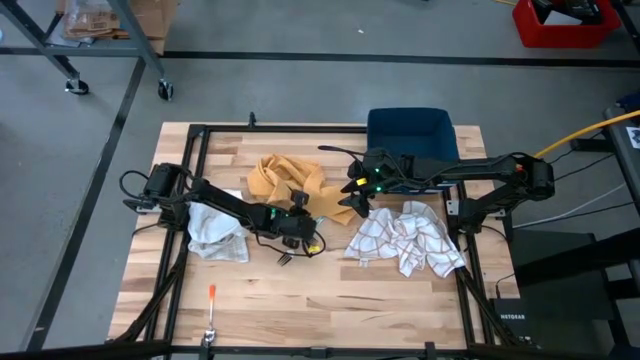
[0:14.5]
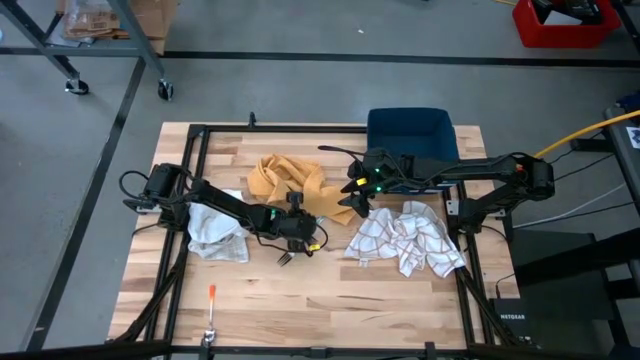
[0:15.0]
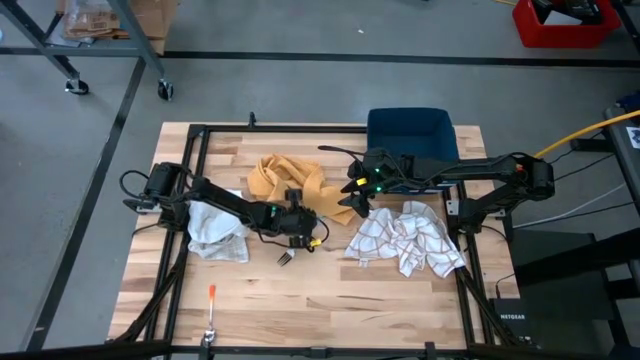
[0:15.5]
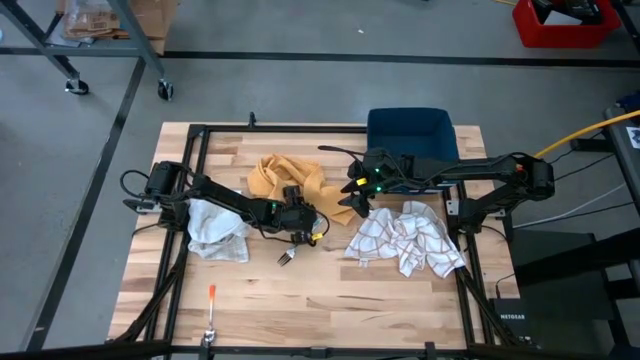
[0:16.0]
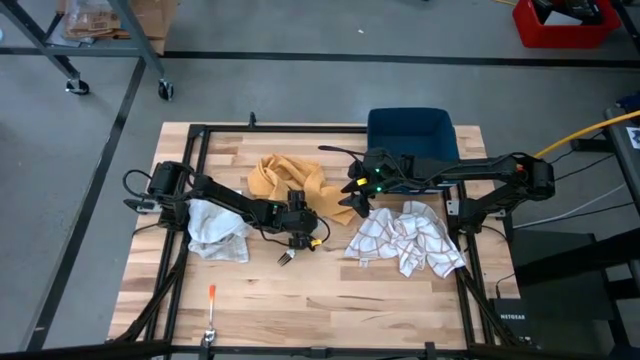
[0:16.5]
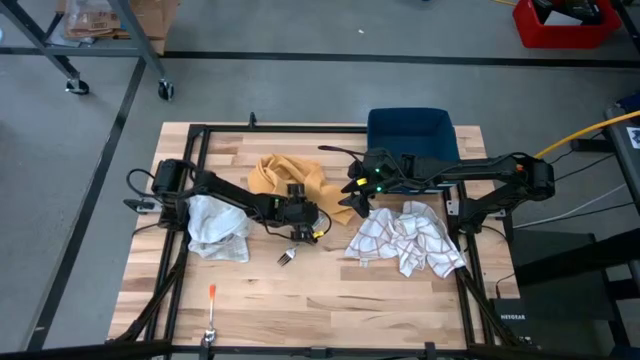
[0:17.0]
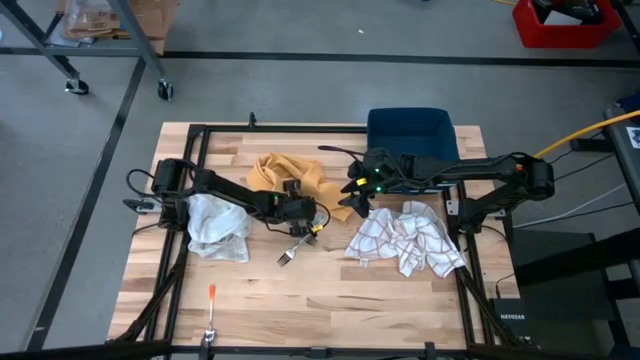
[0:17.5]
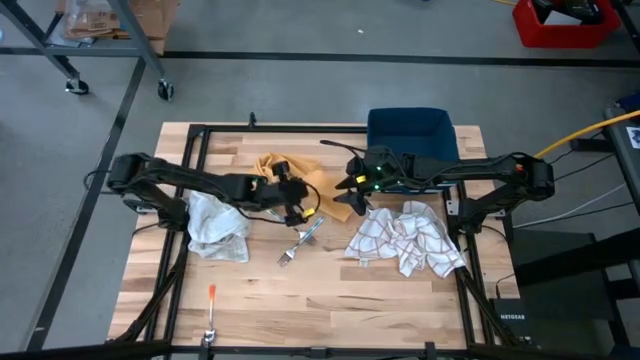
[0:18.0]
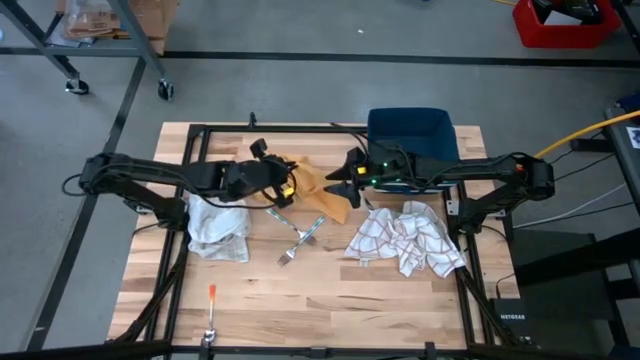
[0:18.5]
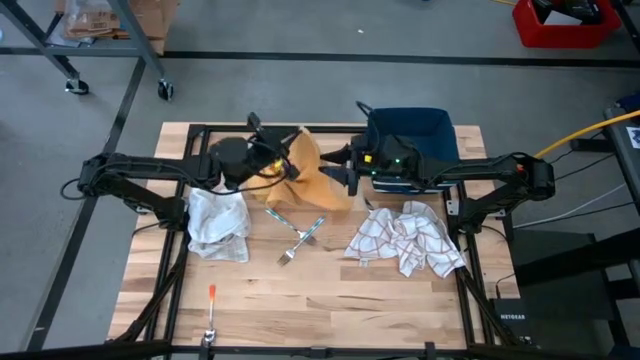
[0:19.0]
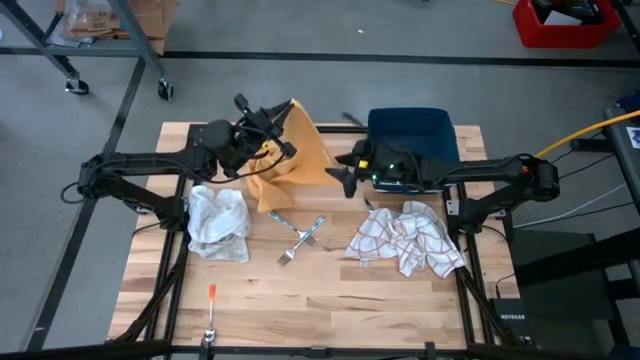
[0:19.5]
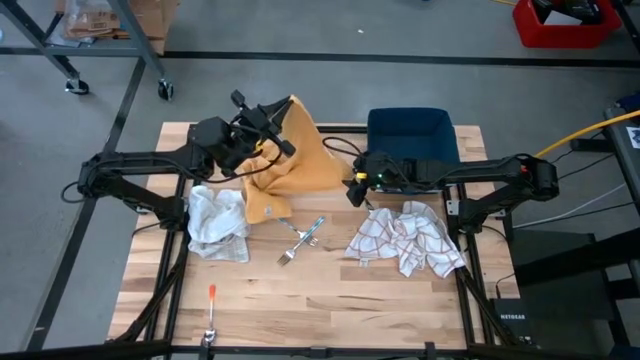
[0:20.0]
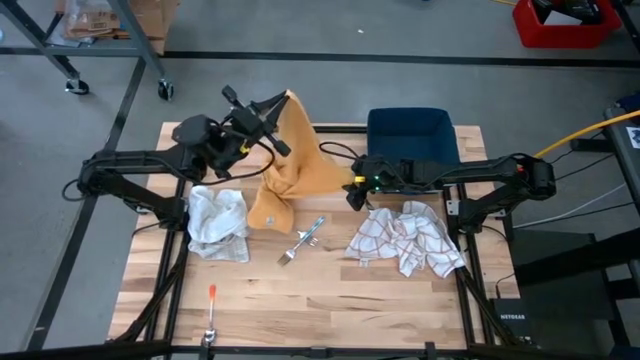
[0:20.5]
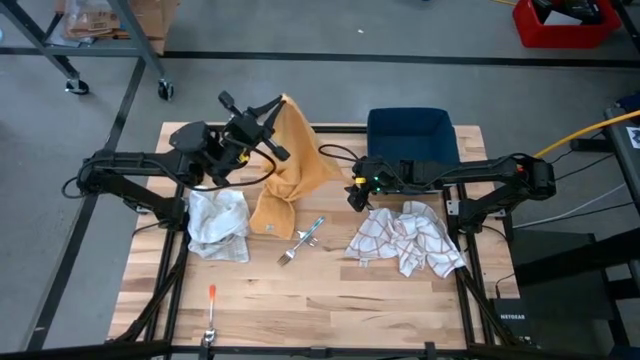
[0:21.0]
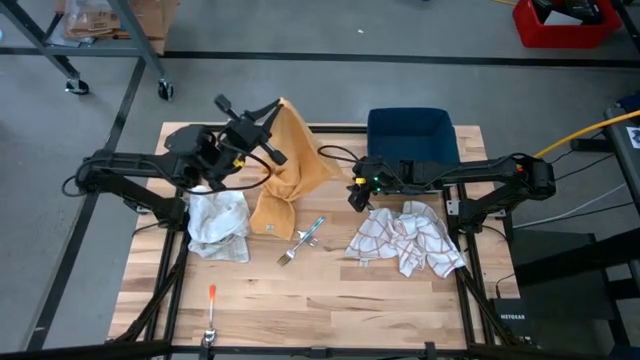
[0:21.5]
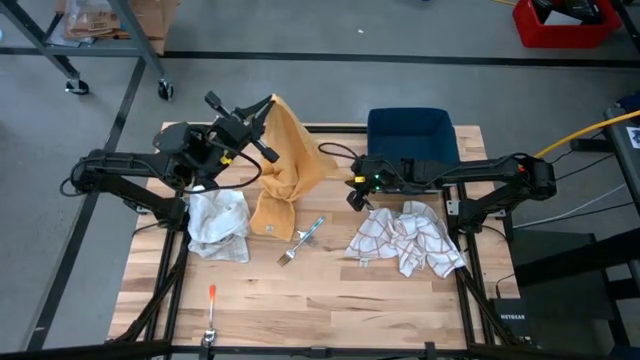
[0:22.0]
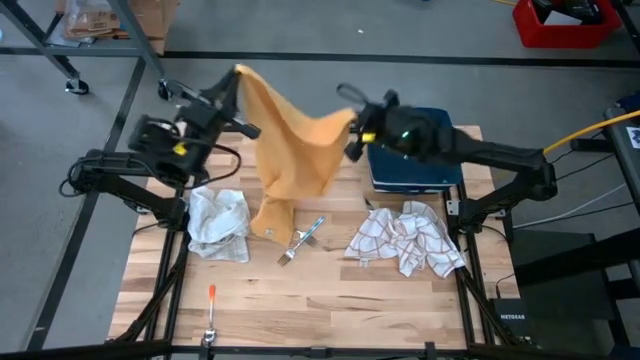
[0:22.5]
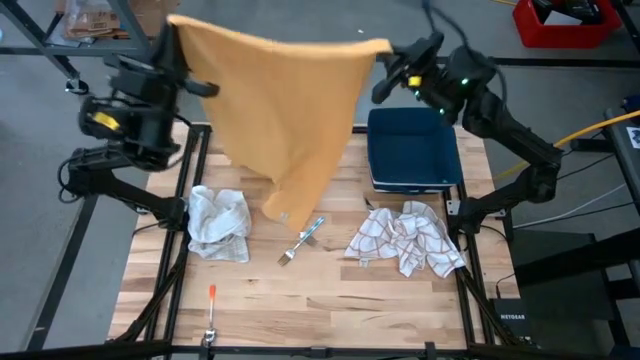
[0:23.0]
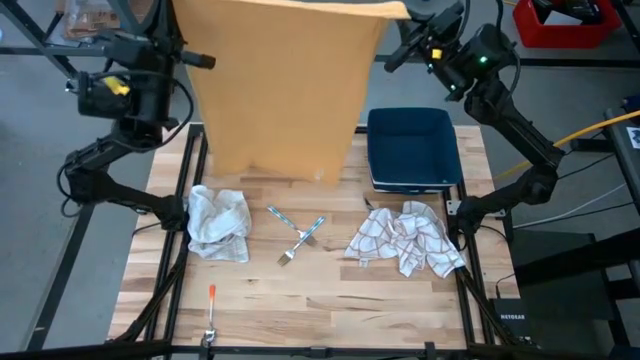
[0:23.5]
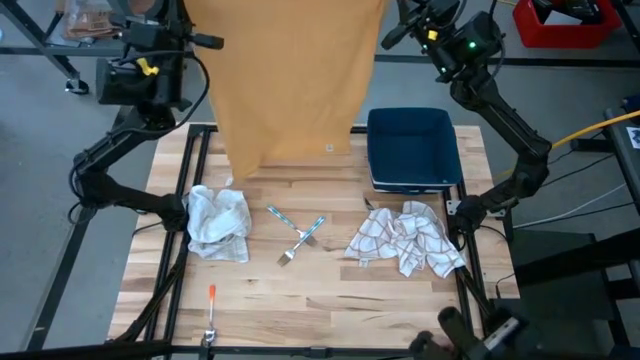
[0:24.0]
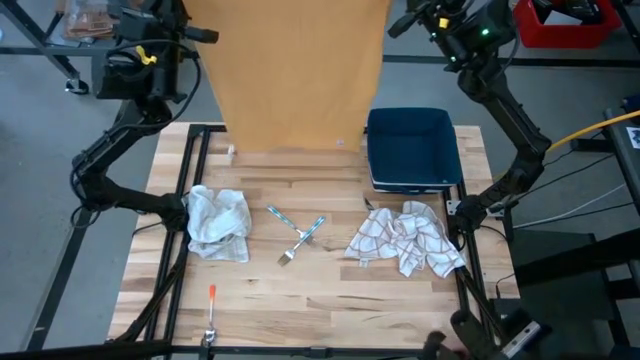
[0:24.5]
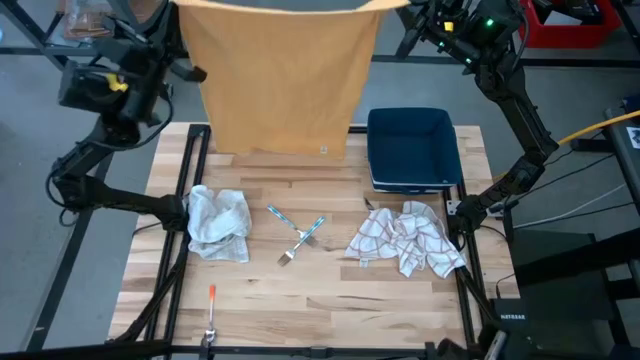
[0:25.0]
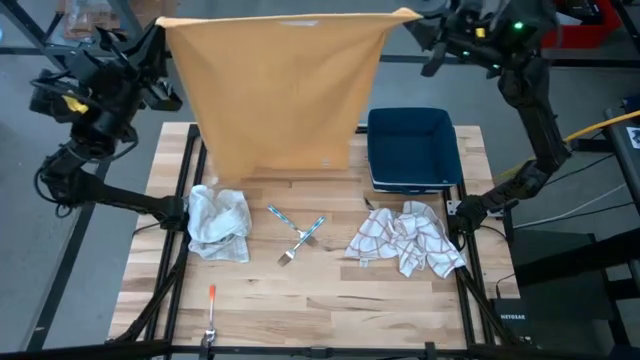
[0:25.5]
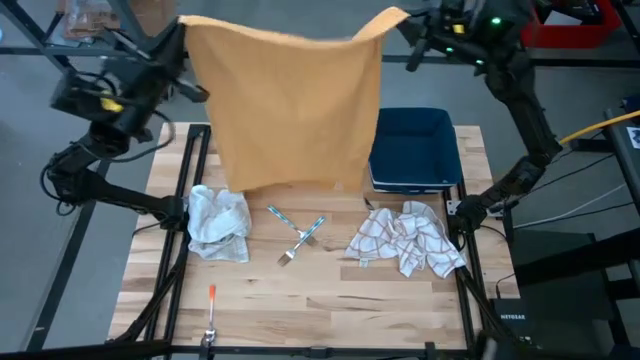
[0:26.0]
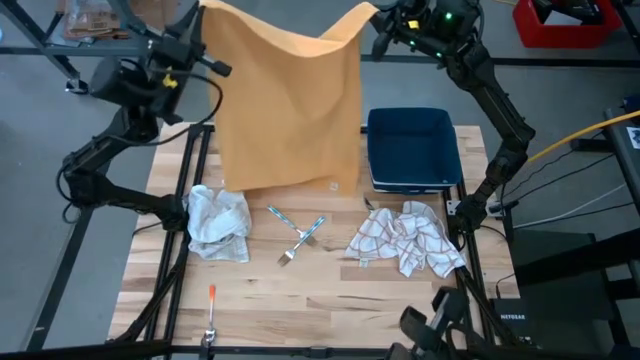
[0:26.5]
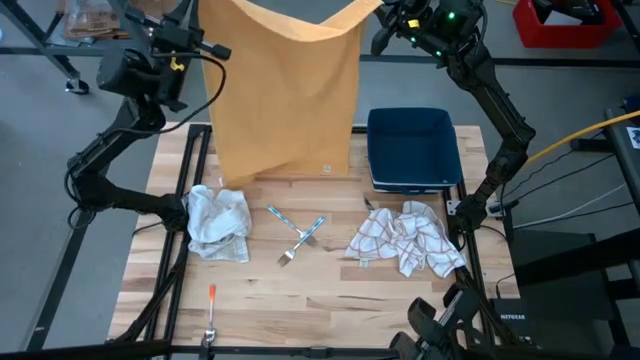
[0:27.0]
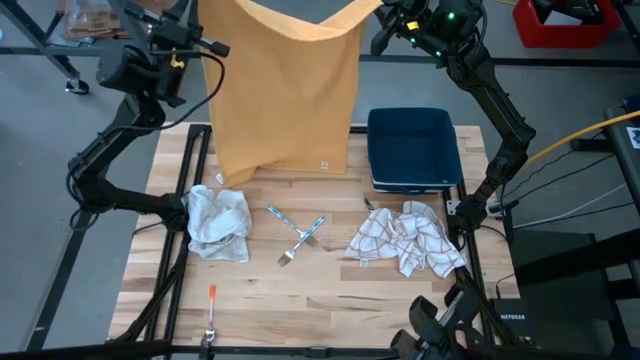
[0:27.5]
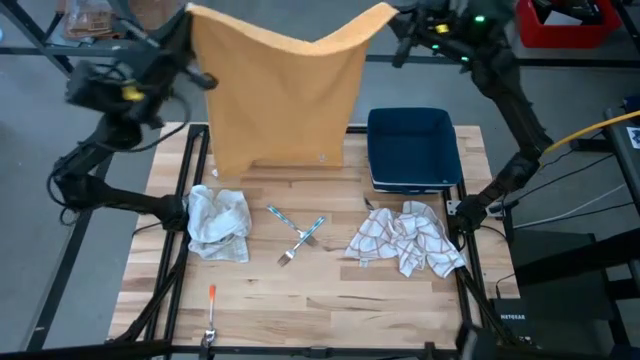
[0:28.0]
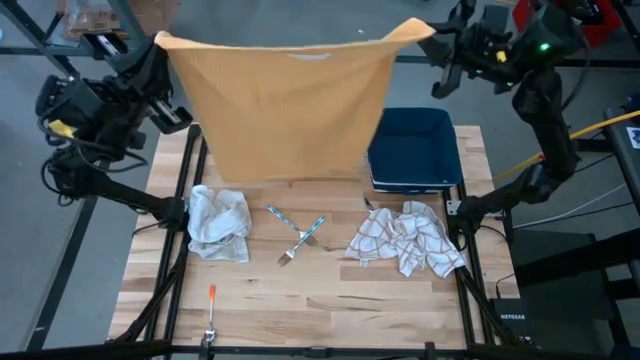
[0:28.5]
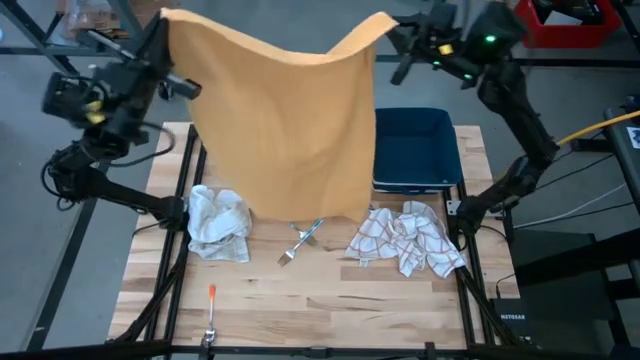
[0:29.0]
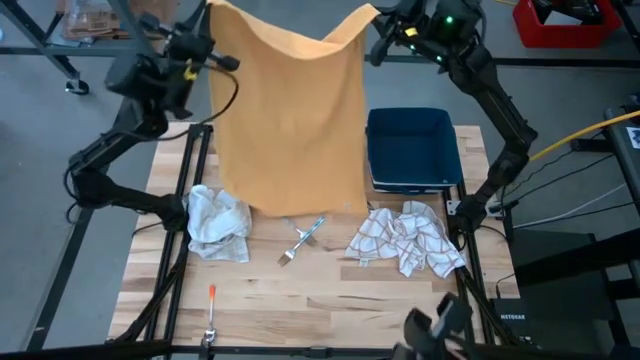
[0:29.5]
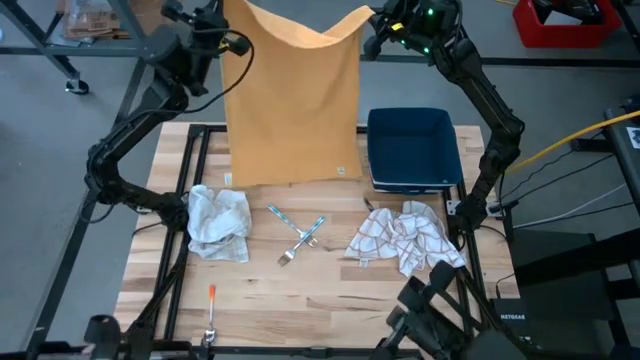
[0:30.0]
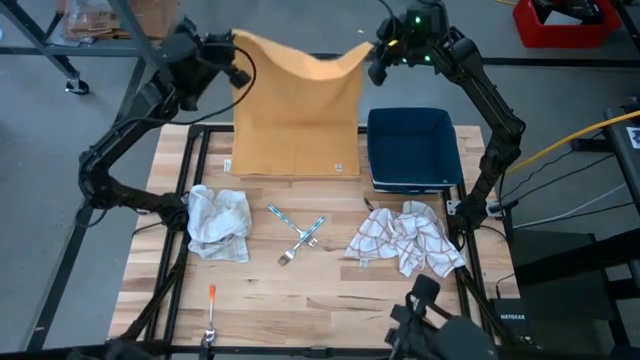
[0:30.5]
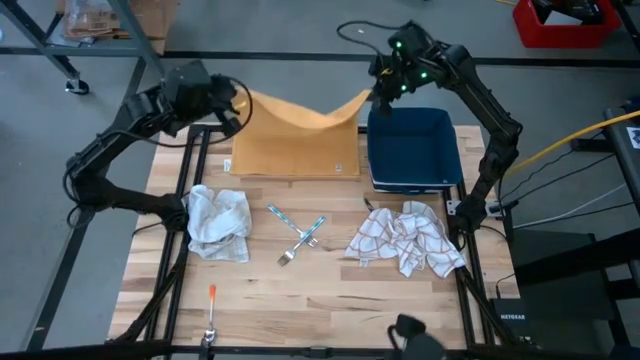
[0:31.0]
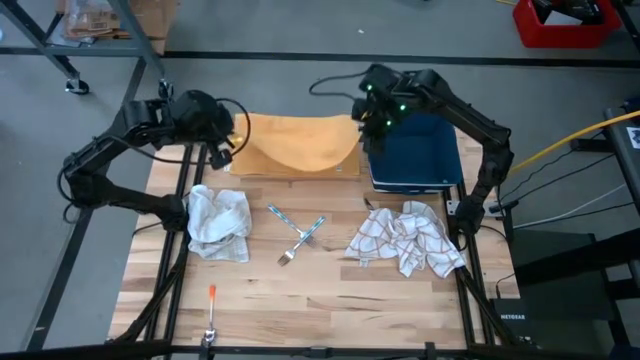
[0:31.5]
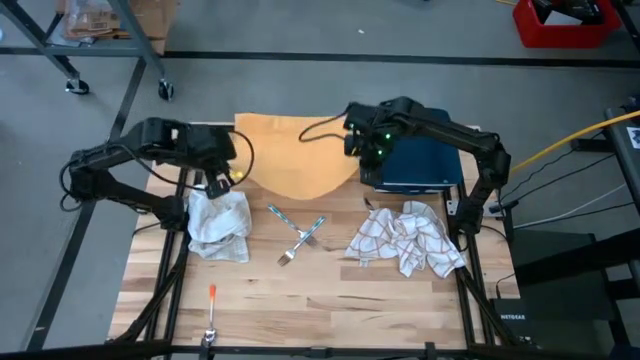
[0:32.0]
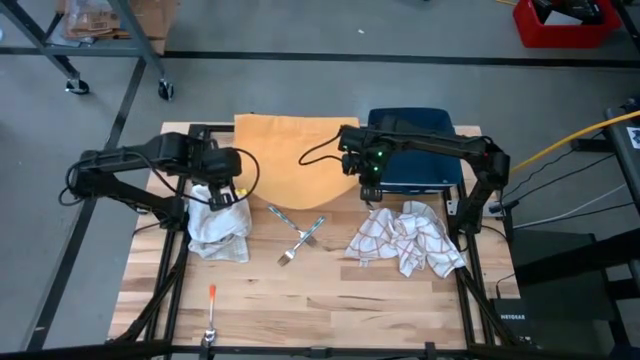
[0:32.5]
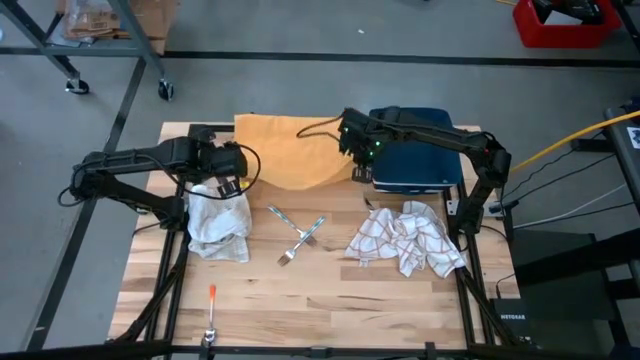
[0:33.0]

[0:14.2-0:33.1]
Task: Fold towel
Fold the yellow towel
